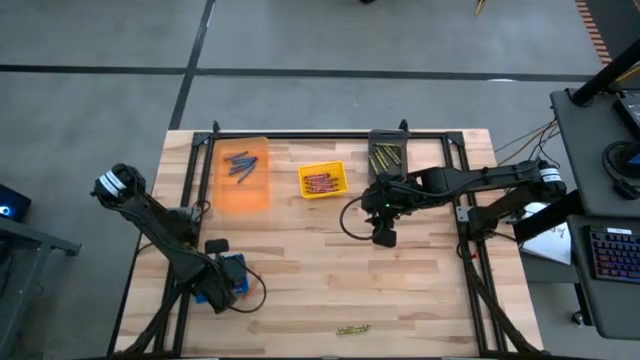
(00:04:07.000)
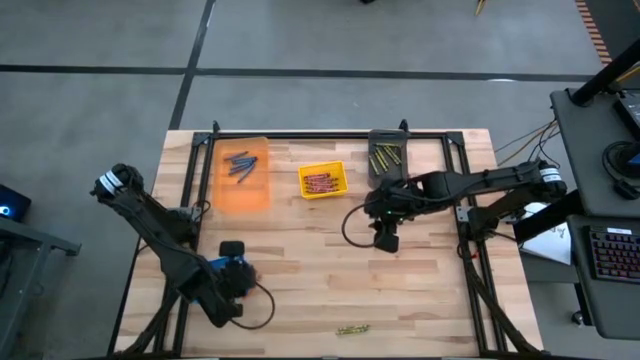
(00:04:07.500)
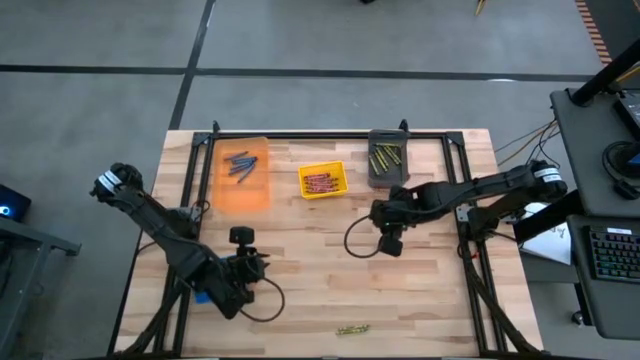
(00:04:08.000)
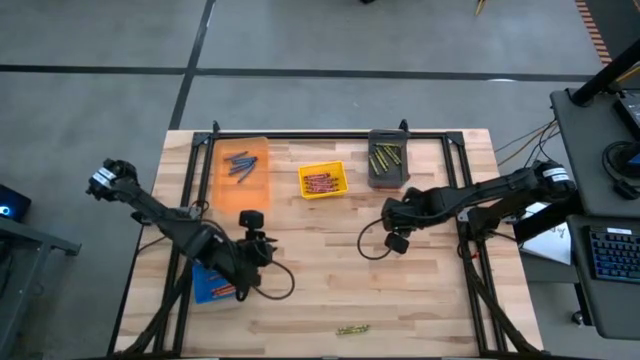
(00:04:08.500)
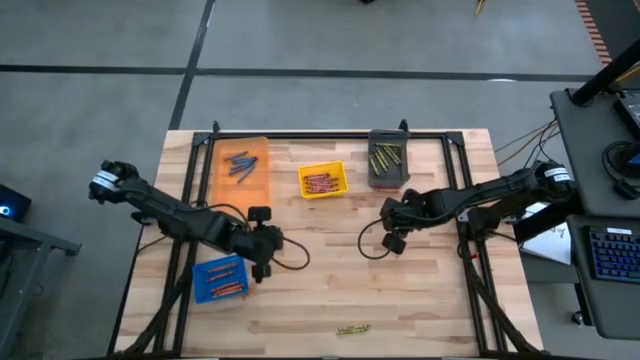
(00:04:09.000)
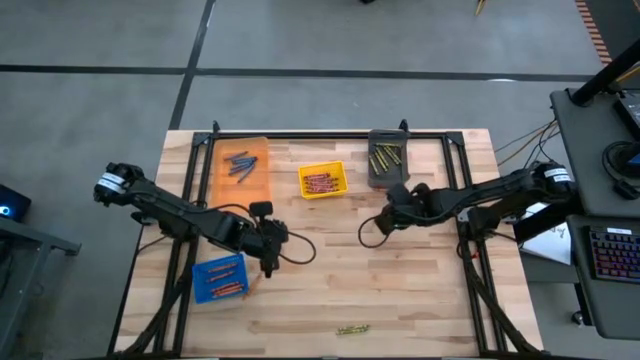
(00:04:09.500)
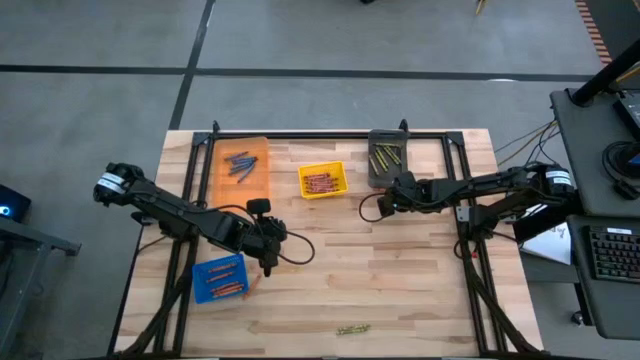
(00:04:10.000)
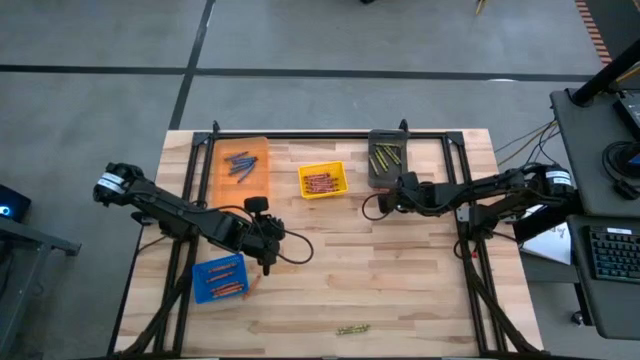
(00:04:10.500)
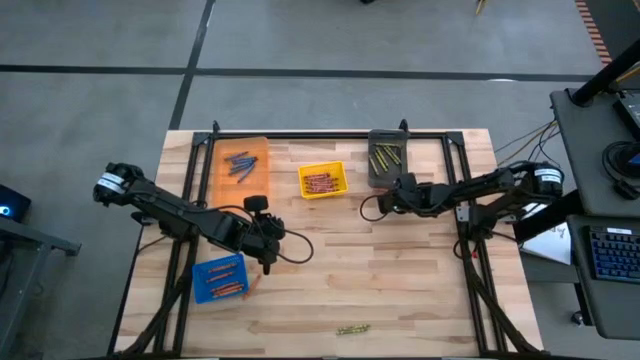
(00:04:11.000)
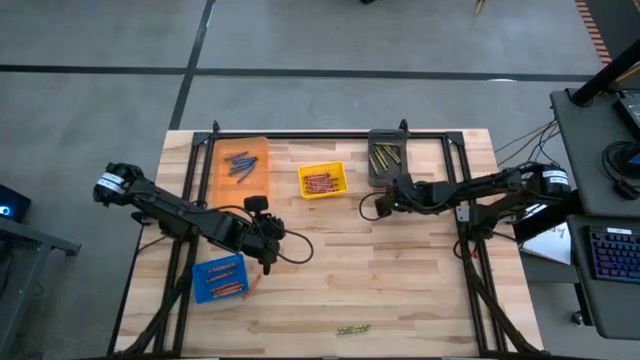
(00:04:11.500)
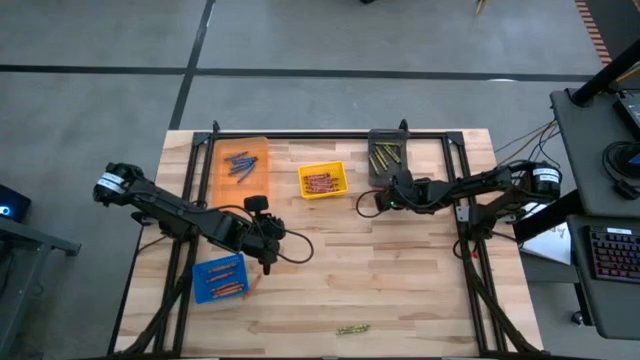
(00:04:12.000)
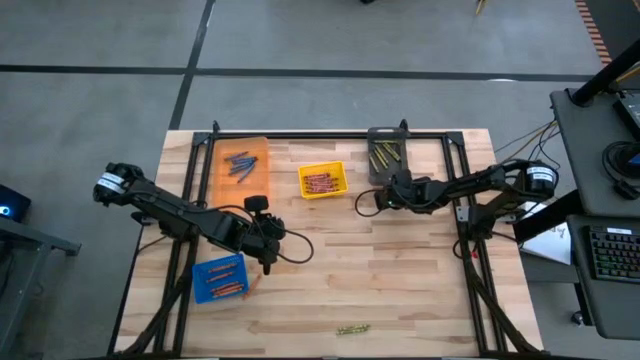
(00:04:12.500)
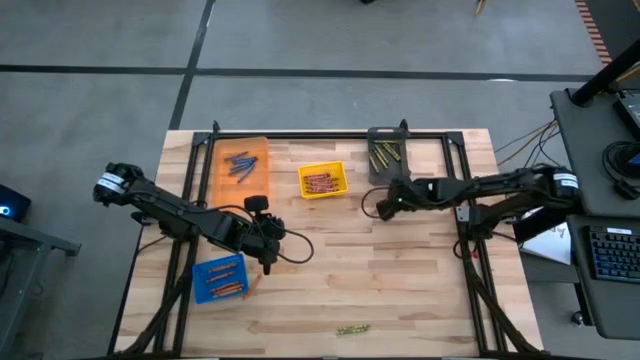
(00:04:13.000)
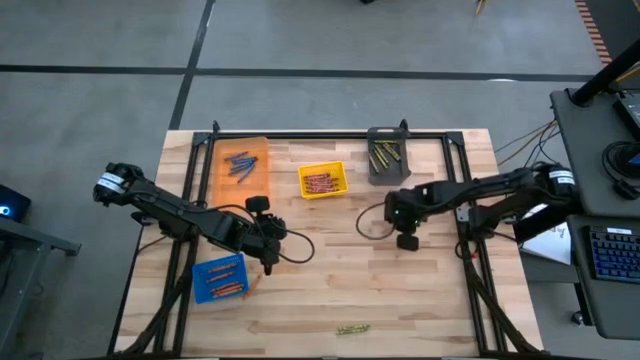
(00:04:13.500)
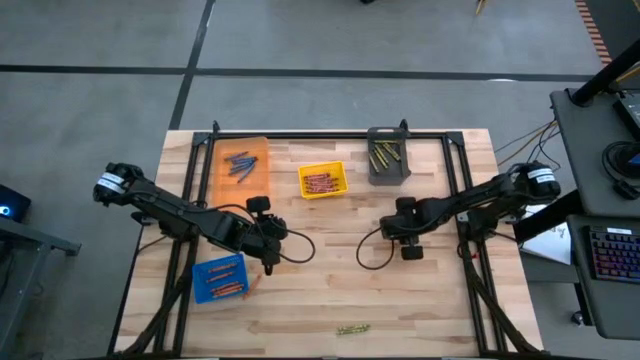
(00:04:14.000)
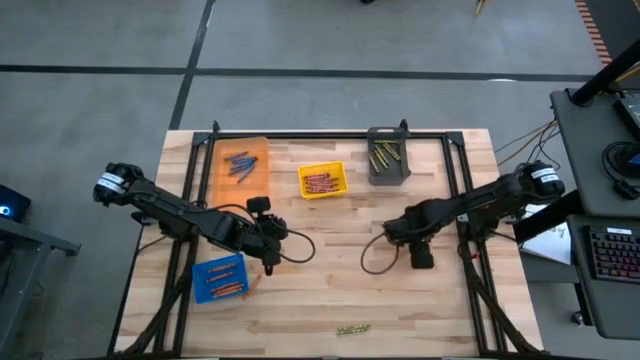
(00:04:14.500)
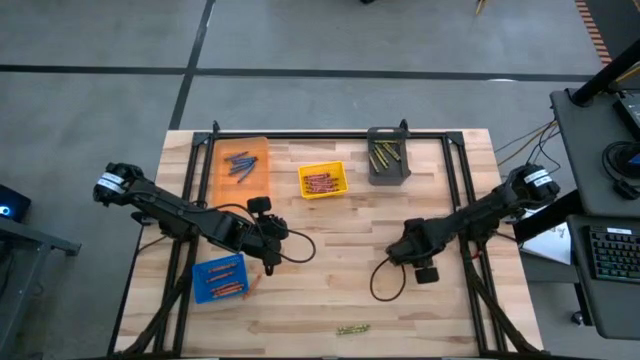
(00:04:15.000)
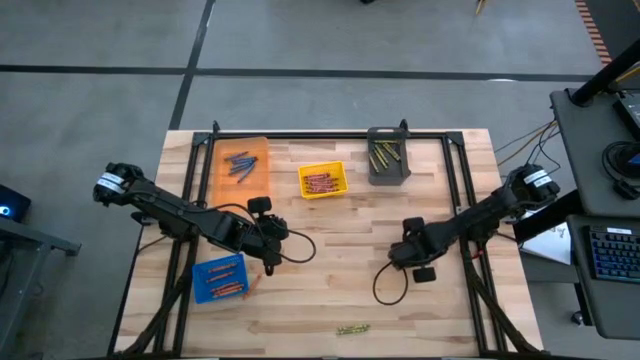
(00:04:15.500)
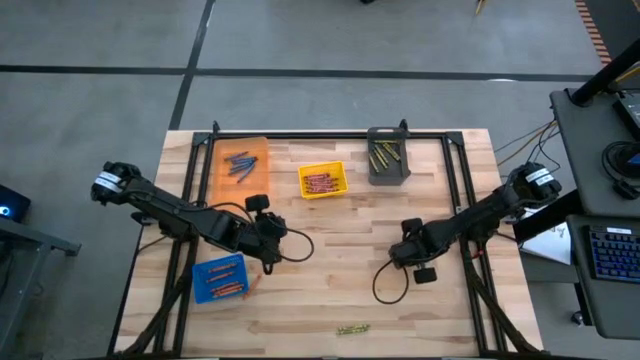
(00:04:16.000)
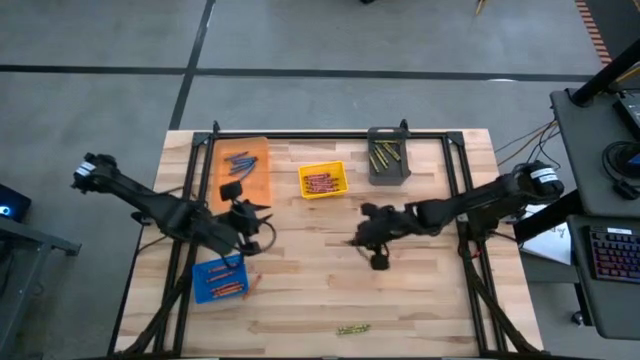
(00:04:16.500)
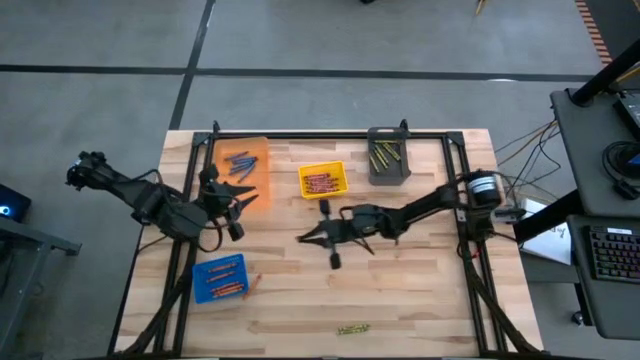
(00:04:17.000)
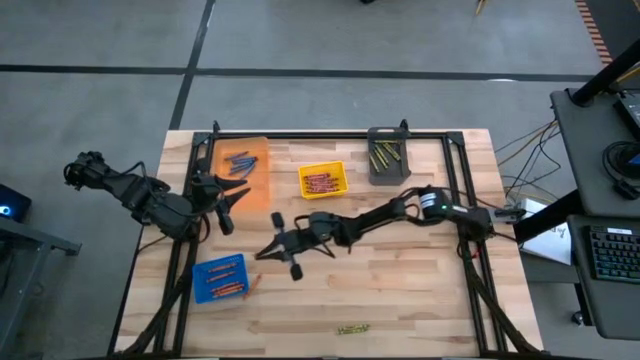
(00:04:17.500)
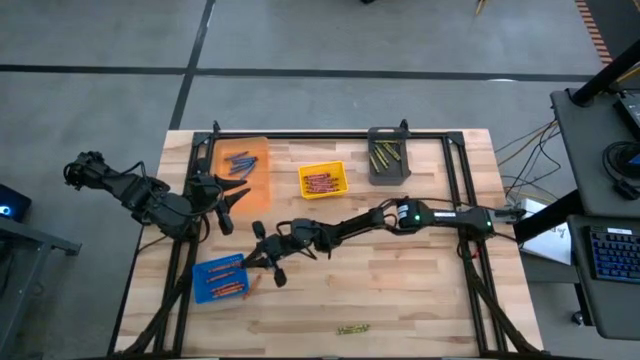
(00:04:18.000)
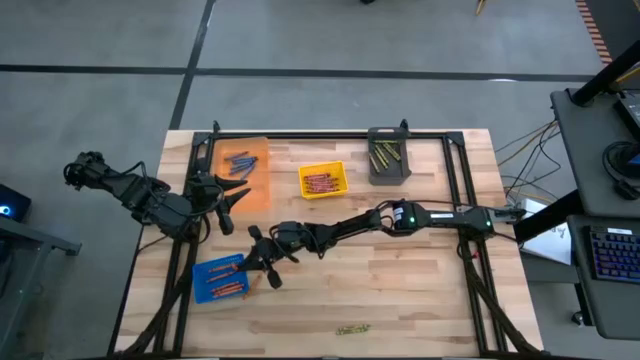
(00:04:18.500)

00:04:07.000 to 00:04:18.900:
Task: Sort crayons
Put the orange crayon into the blue bin

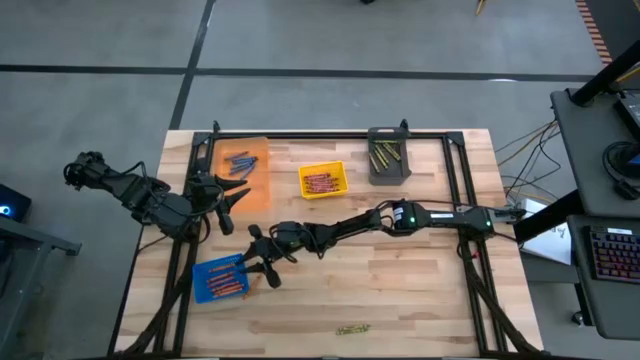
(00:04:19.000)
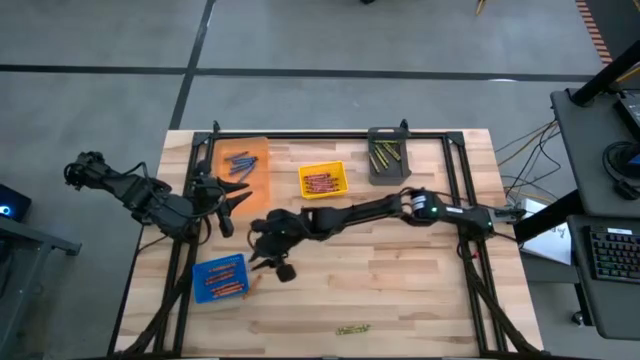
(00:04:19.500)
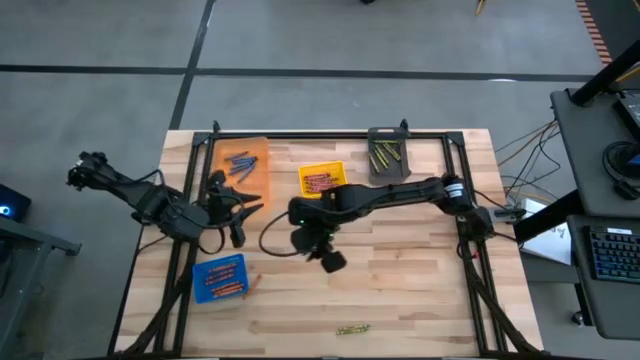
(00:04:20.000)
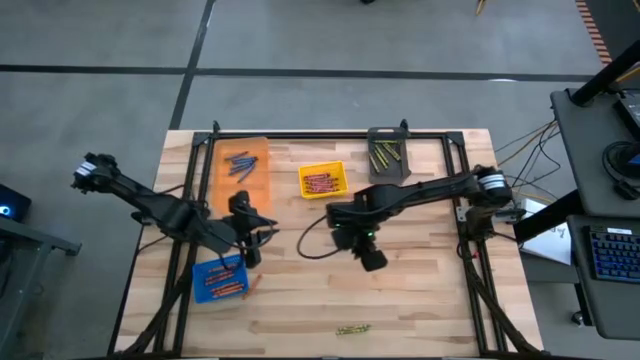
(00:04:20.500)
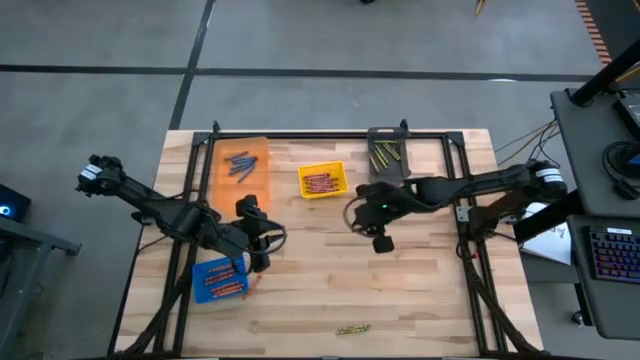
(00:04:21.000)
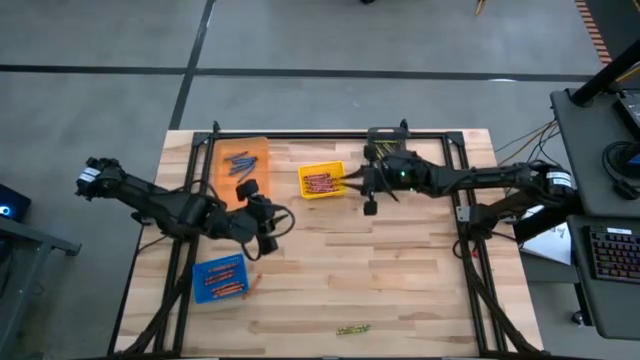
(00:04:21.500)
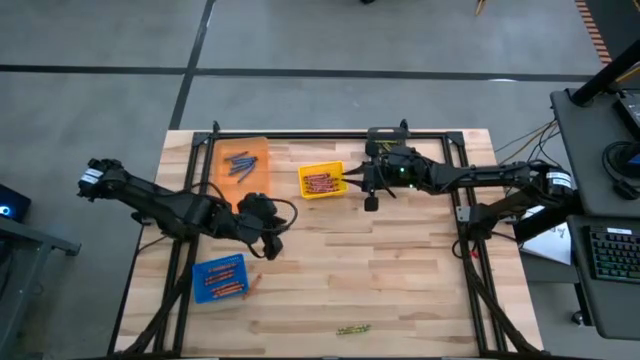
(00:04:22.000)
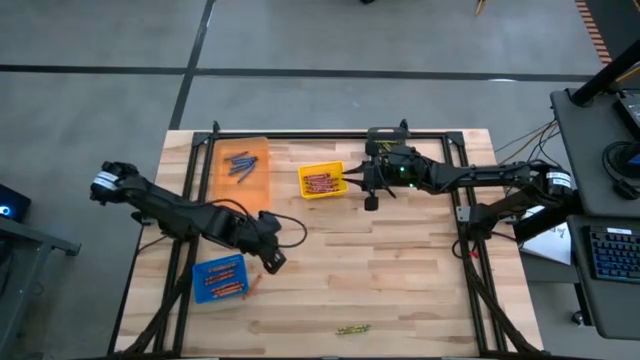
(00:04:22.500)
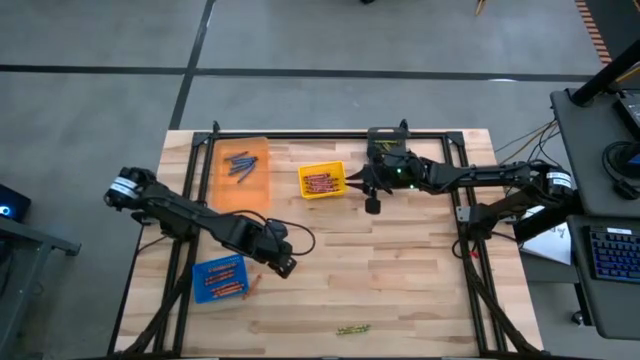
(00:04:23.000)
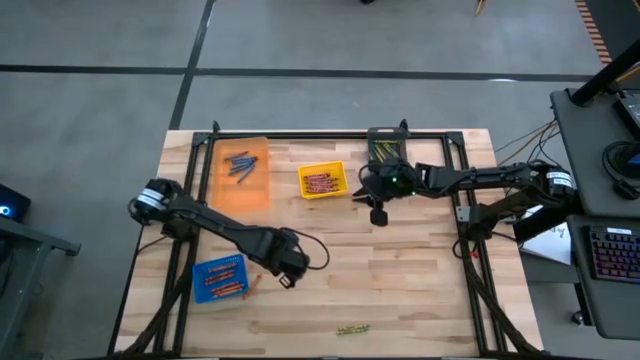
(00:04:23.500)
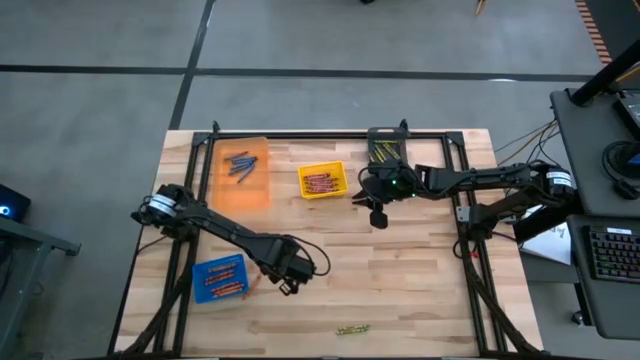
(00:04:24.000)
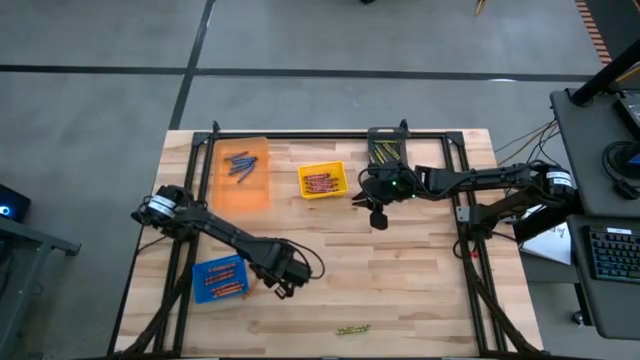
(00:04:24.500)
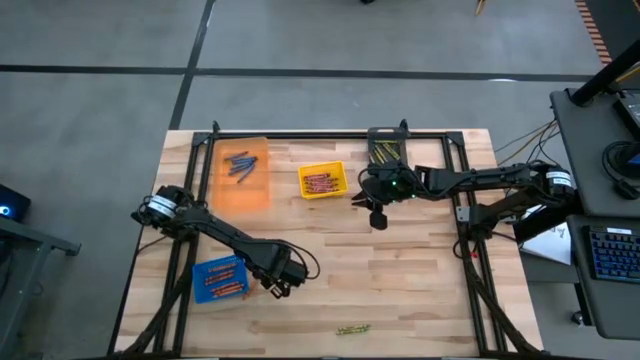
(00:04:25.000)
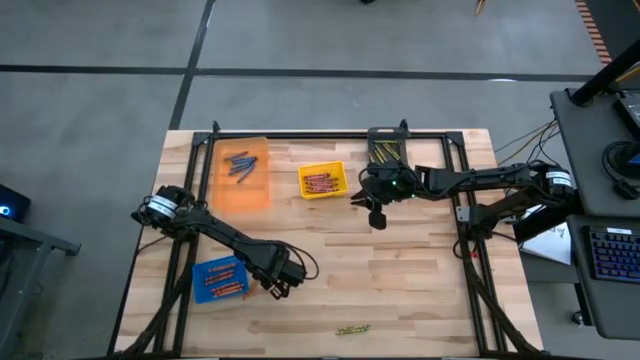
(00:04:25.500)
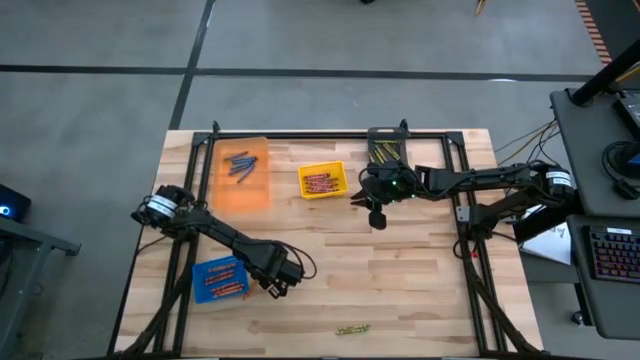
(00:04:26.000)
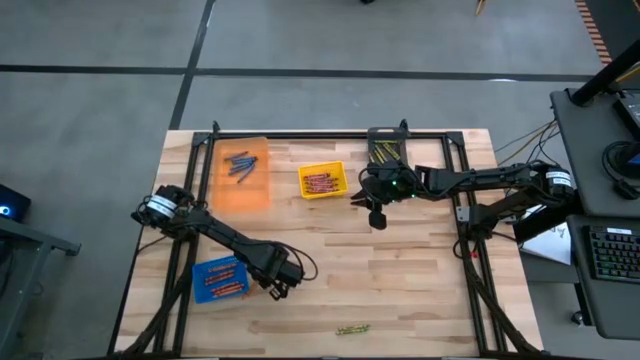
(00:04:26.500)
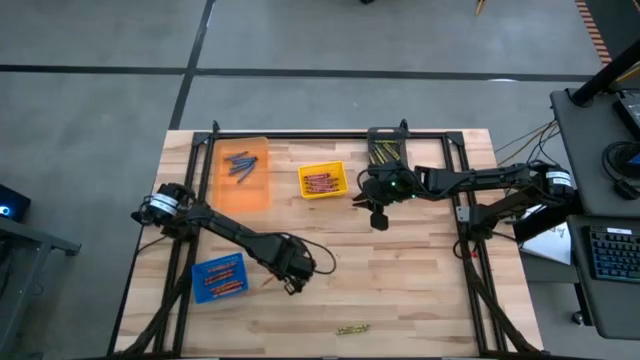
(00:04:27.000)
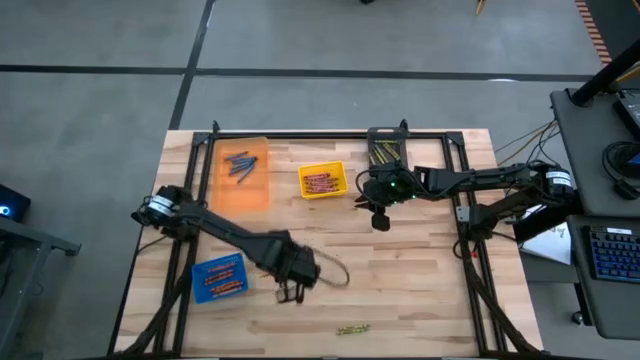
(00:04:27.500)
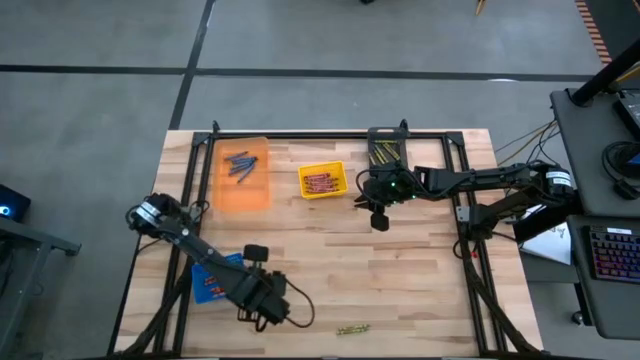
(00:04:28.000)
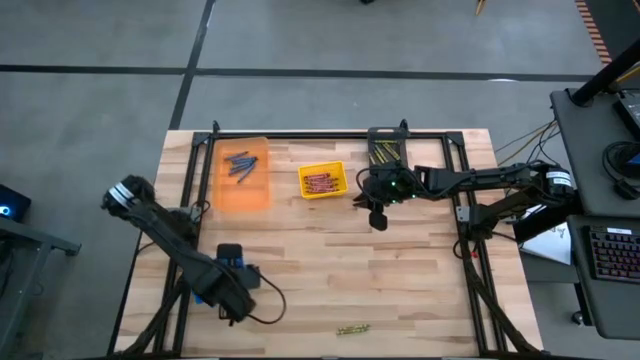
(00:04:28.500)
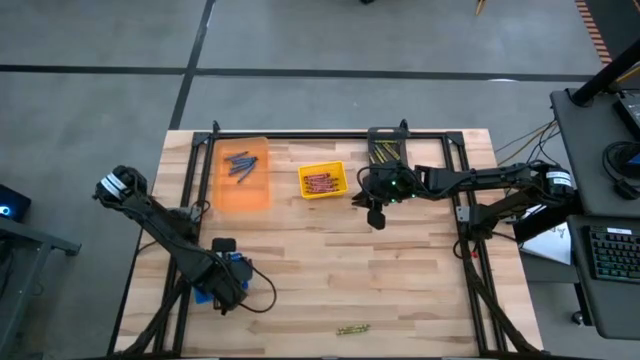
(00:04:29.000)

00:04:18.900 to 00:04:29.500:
Put the orange crayon into the blue bin
